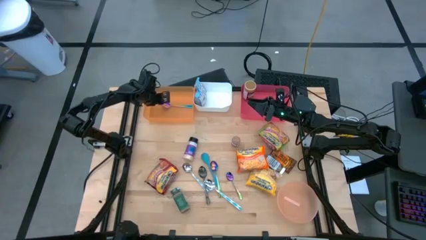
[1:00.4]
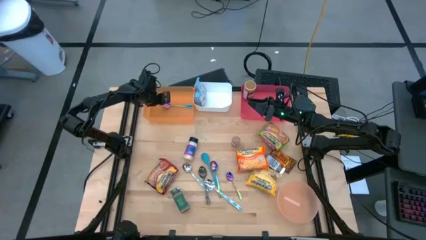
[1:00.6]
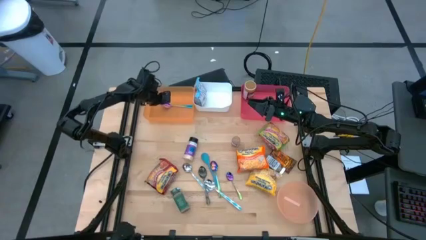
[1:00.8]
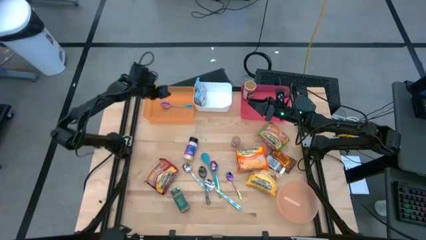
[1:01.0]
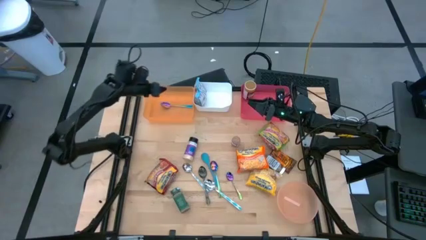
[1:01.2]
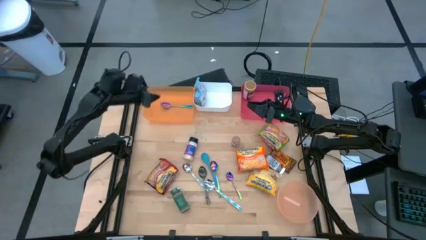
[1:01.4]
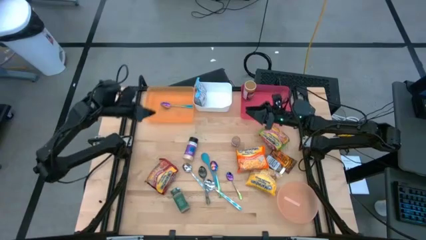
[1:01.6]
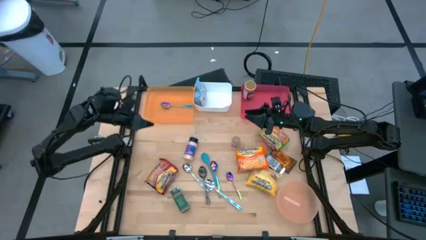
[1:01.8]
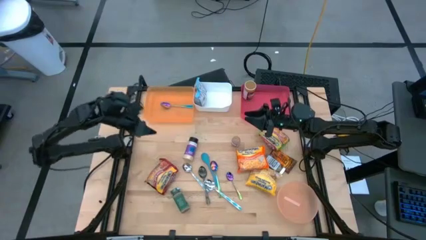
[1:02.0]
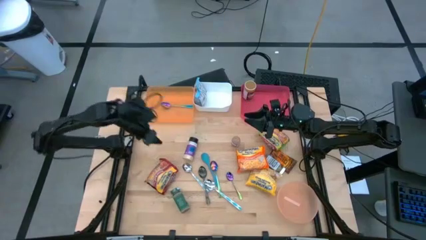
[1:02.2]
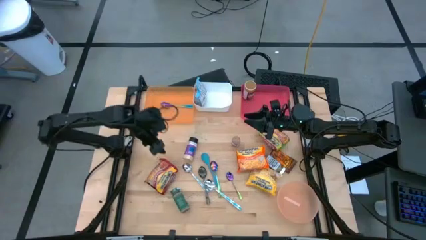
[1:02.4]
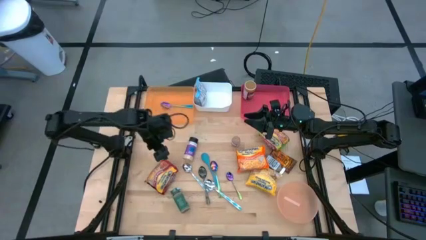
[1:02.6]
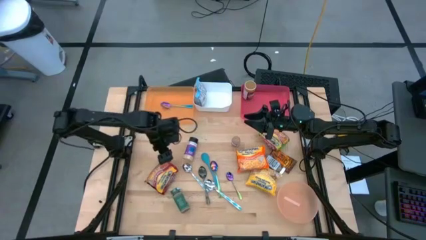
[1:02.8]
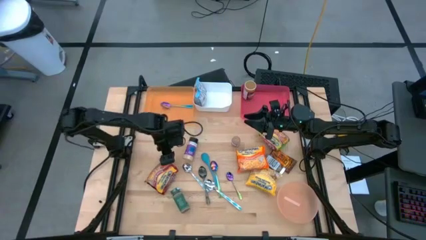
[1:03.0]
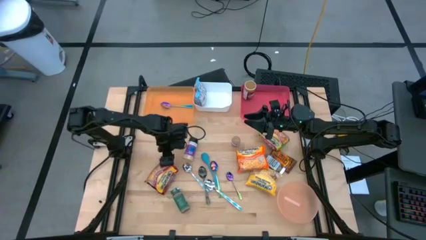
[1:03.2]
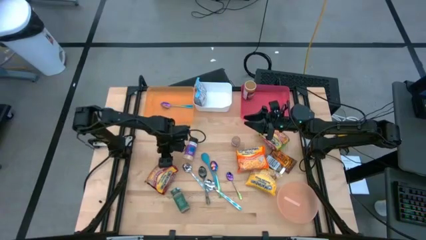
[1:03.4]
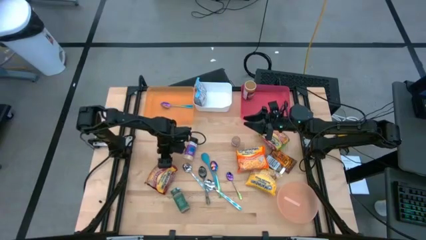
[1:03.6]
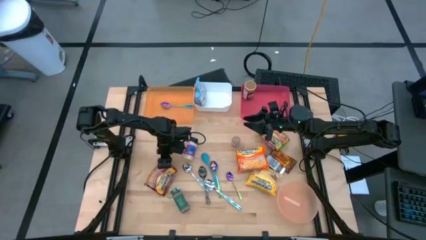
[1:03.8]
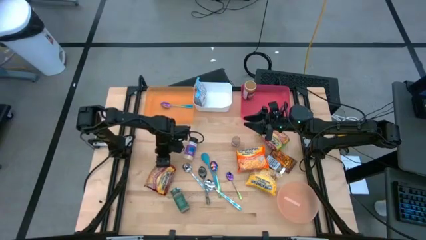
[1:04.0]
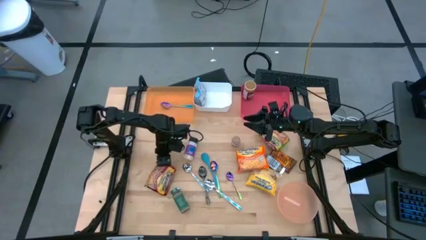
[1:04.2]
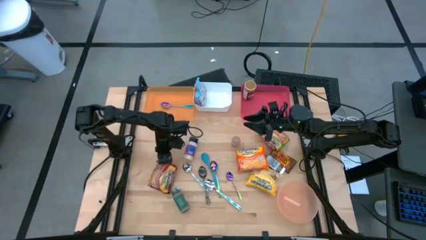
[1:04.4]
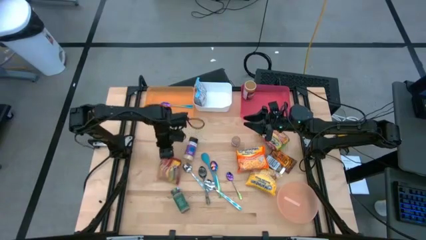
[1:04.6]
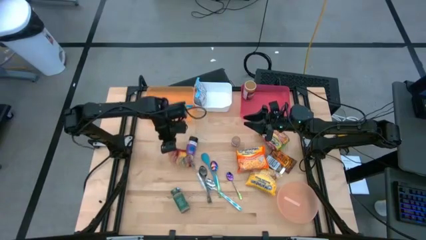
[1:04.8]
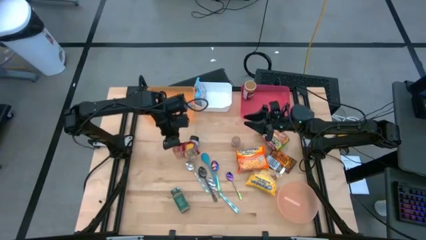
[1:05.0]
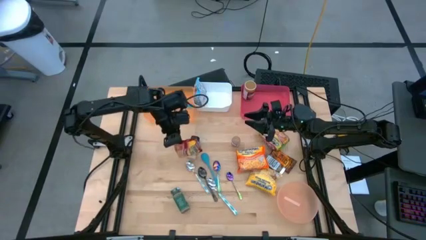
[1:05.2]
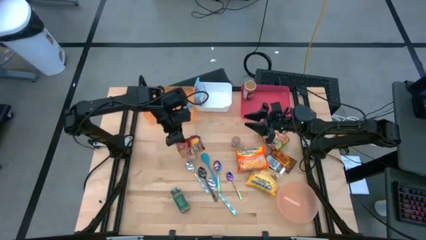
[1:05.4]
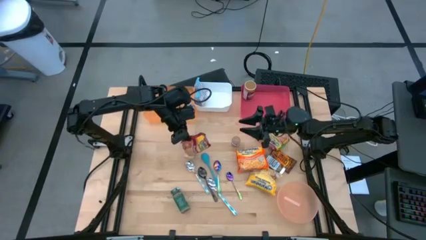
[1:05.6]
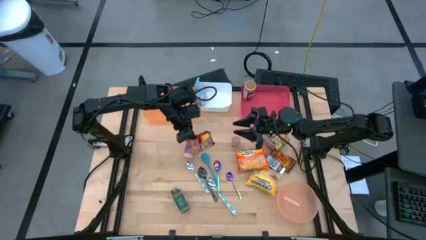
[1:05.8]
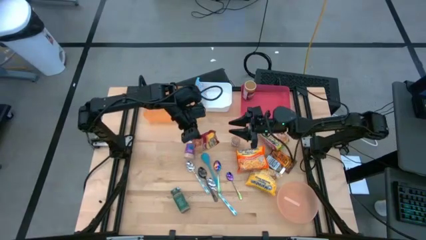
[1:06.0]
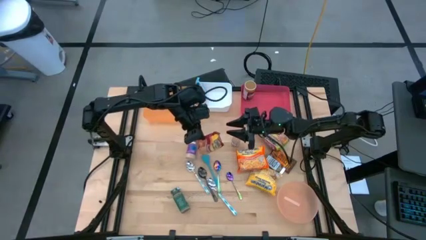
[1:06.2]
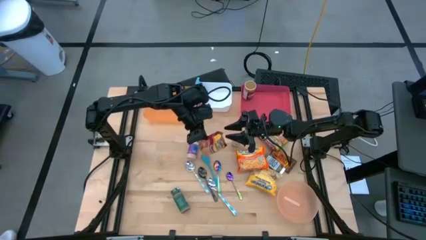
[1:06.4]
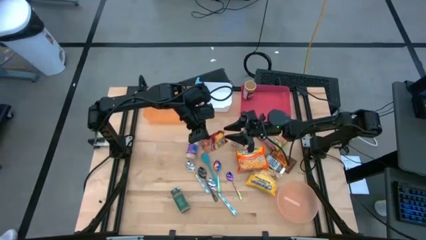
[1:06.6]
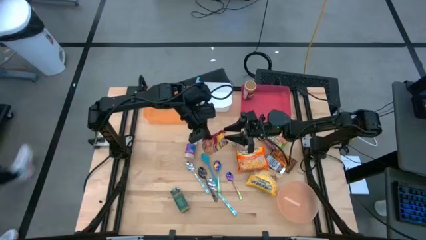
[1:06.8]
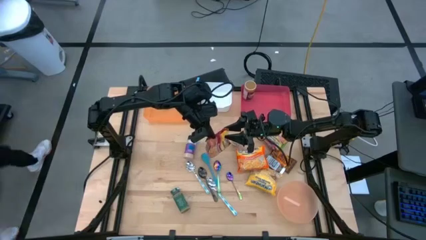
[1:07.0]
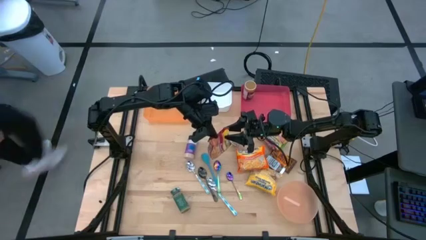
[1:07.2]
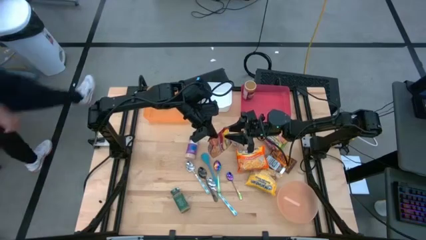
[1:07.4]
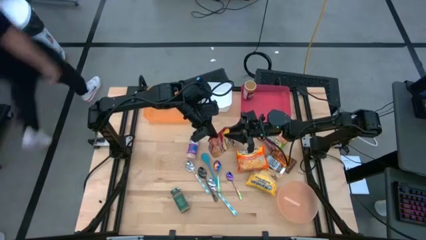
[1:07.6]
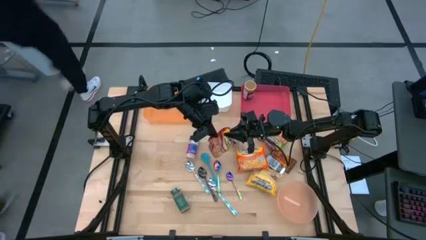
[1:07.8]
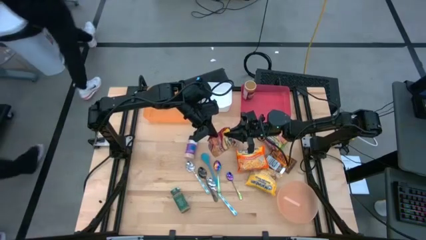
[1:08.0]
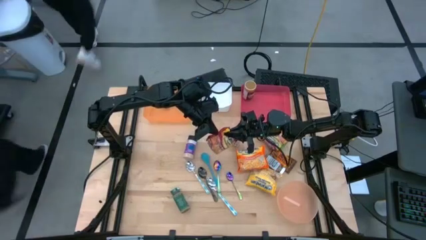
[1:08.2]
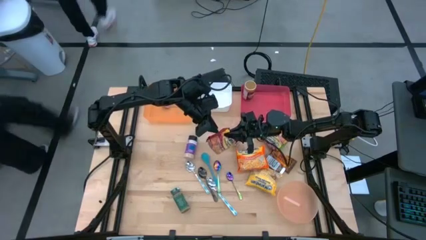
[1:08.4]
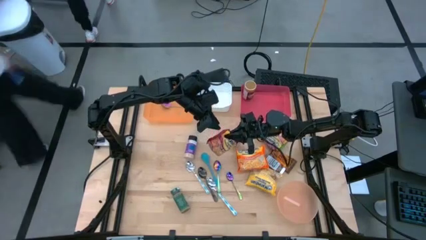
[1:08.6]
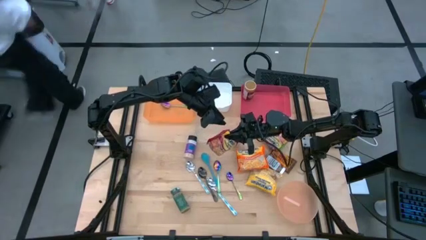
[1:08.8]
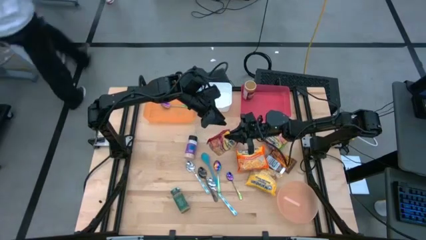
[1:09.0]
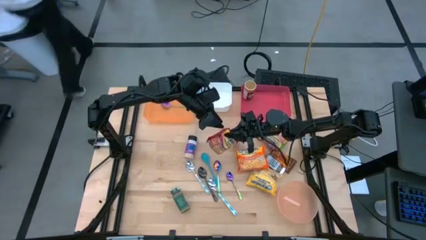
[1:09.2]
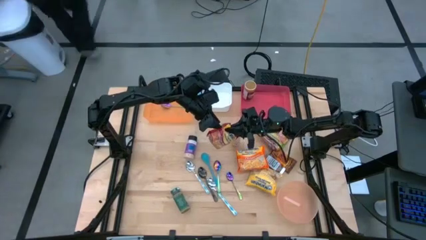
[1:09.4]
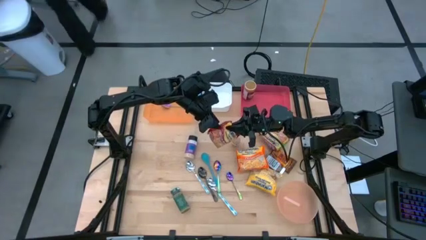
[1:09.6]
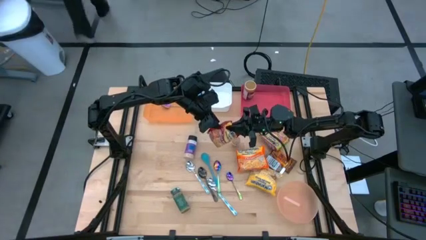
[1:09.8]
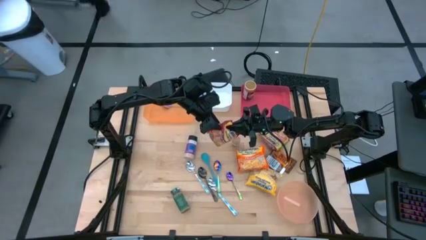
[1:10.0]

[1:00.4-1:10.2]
Task: Pick & Place Food Item
Put the red noodle pack into the white bin

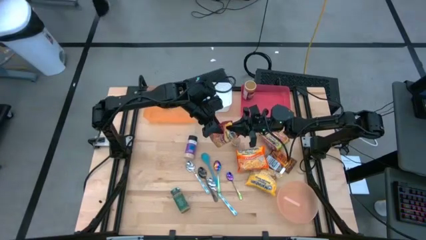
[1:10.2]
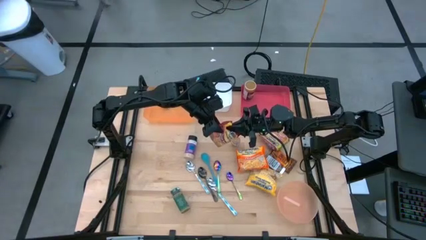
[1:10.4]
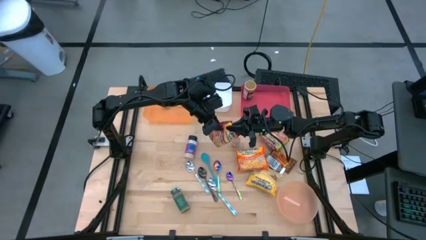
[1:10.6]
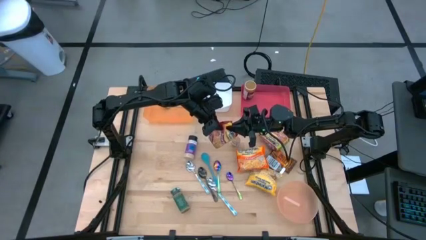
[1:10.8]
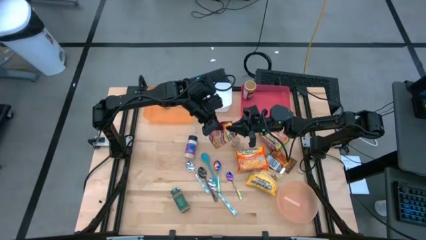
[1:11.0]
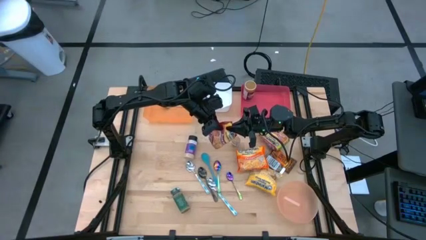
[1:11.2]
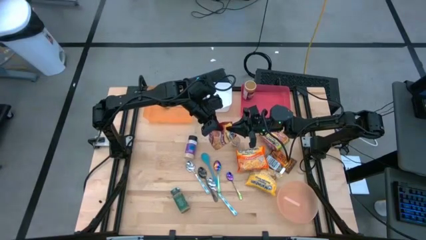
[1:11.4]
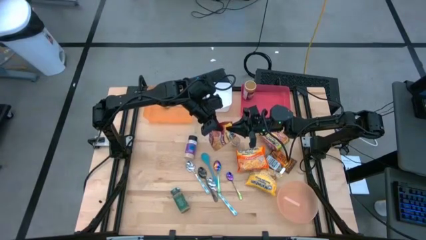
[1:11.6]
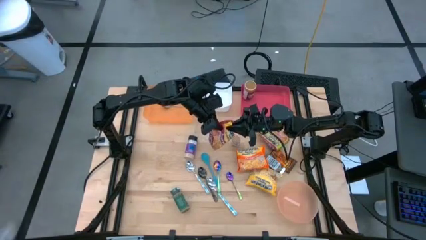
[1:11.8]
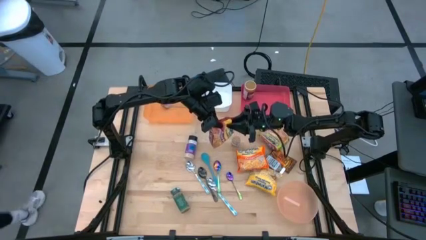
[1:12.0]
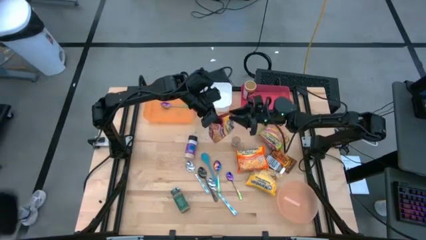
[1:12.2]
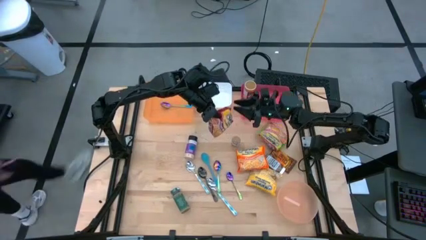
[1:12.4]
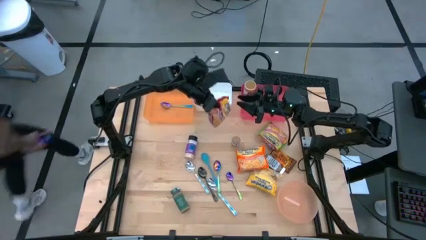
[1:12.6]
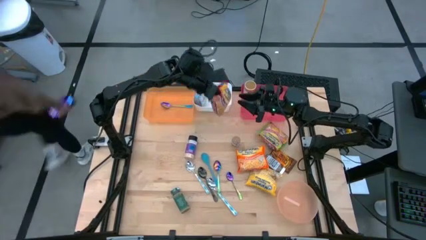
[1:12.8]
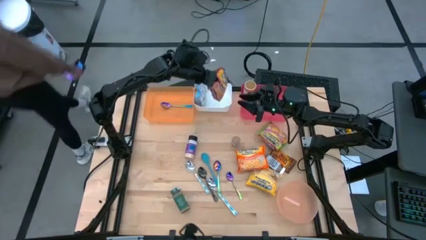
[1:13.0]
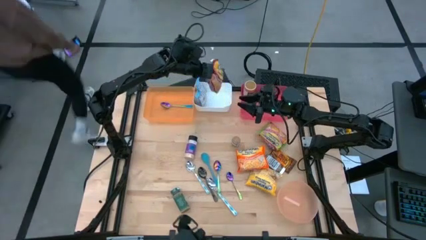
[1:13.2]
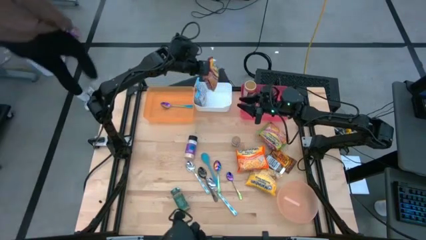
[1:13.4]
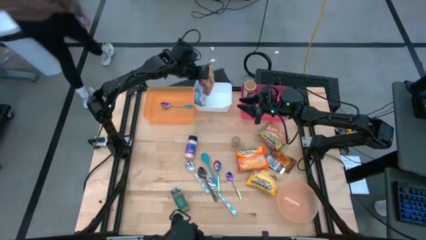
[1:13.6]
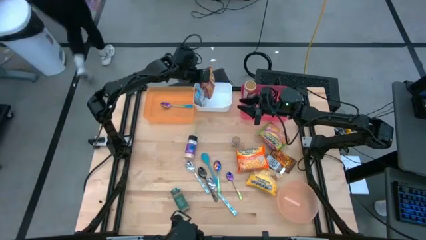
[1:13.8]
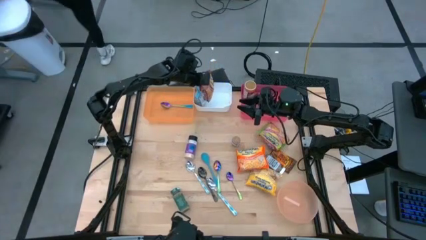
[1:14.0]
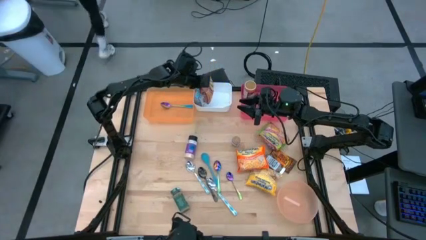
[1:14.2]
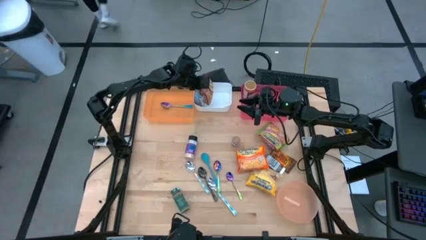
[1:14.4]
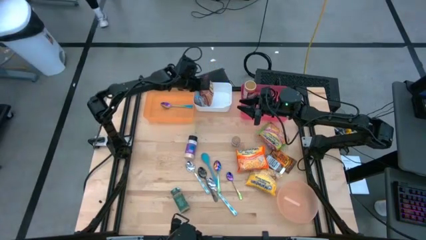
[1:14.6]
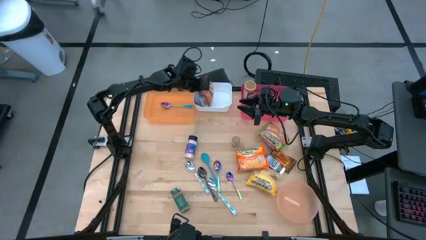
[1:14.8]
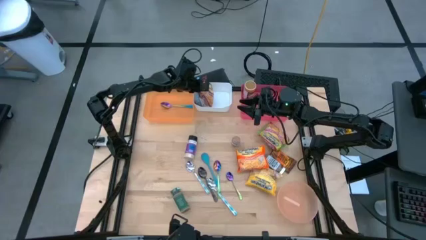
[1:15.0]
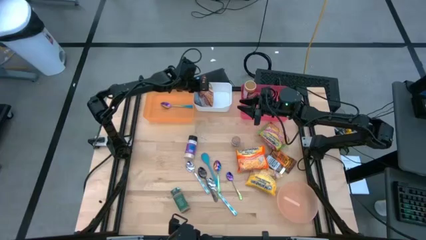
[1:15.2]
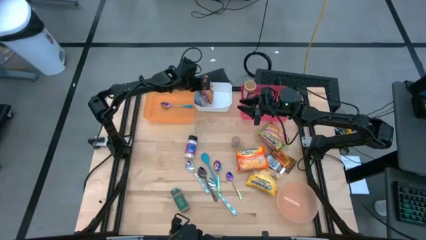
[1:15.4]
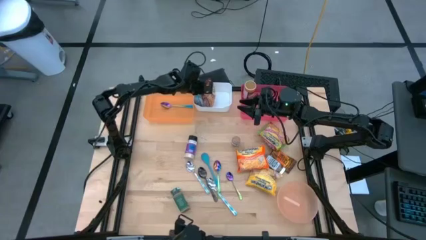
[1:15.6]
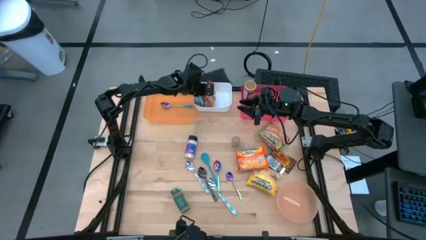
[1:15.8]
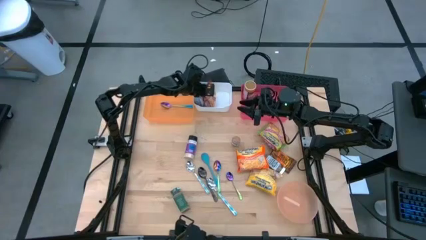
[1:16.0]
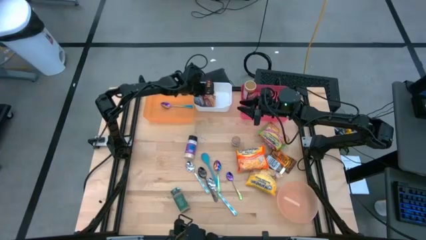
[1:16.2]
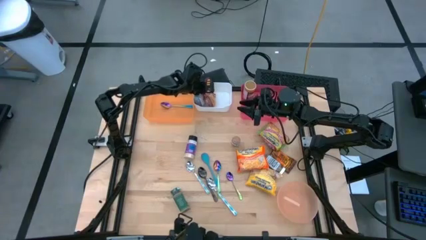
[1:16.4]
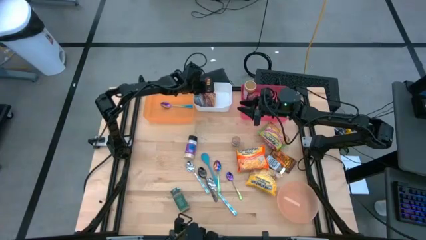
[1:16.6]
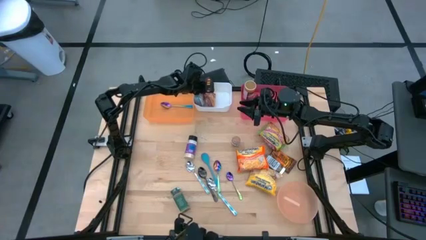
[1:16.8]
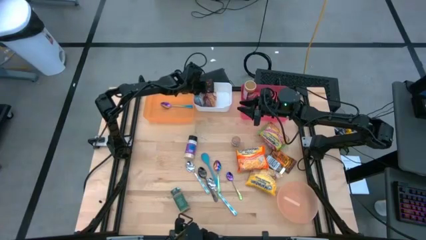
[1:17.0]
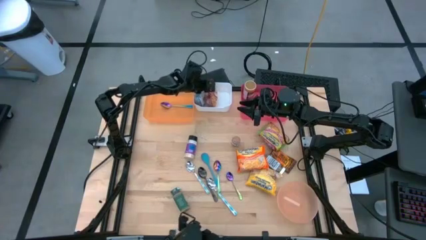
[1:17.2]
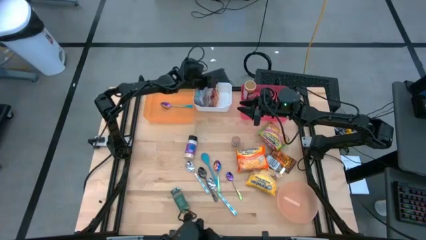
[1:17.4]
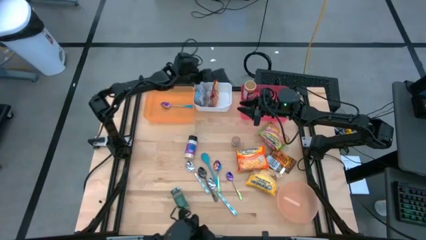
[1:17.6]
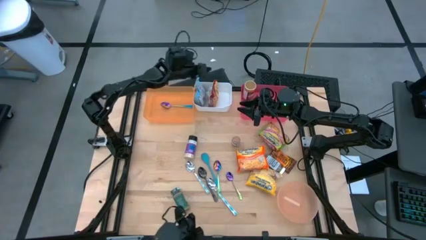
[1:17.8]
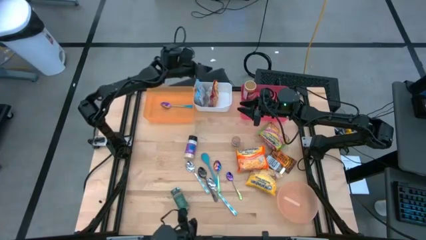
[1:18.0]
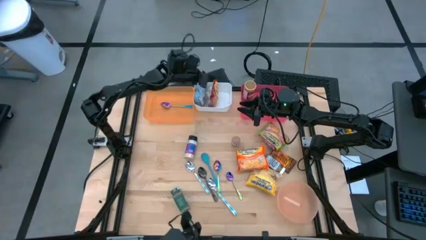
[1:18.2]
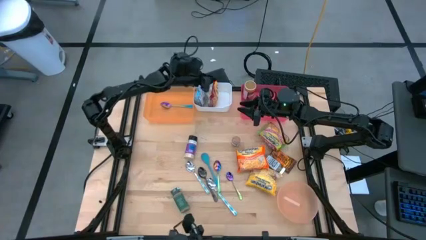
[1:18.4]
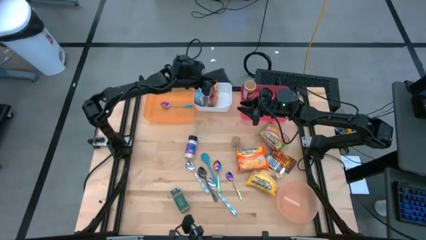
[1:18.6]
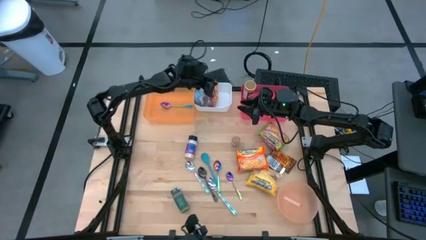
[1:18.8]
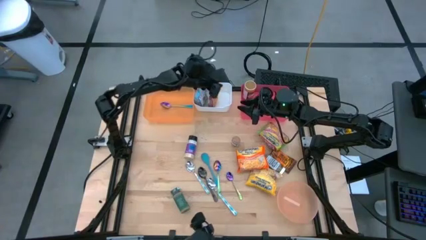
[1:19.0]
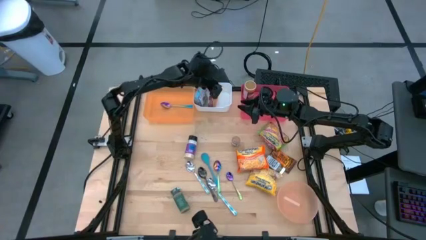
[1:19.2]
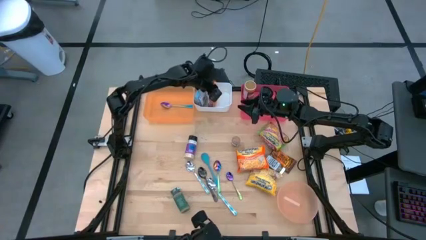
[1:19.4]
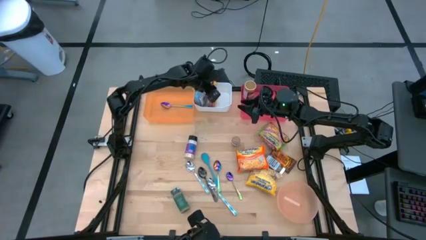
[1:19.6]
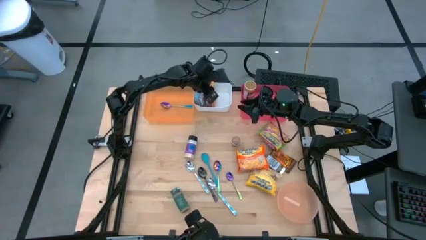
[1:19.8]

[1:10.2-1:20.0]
Put the red noodle pack into the white bin
